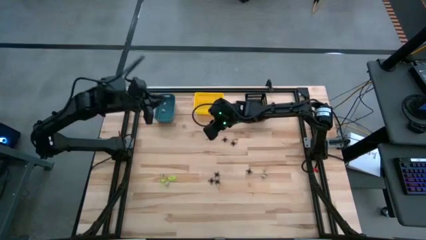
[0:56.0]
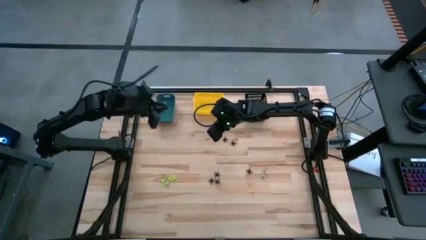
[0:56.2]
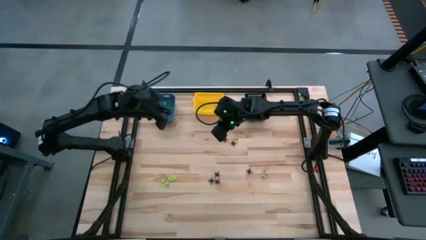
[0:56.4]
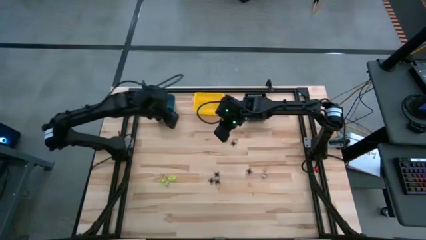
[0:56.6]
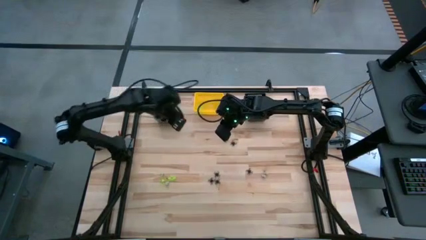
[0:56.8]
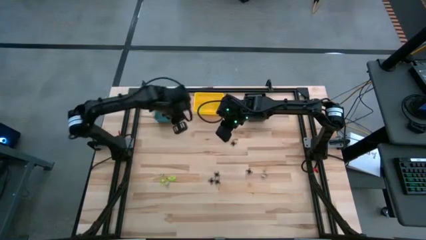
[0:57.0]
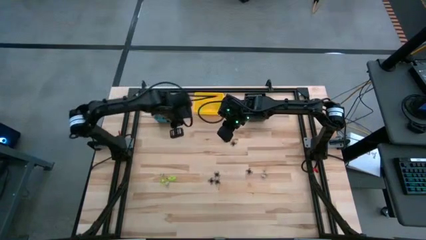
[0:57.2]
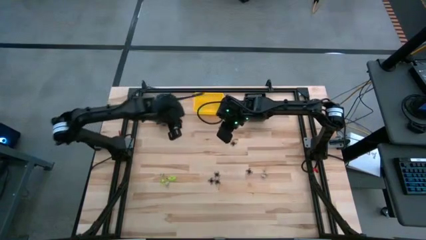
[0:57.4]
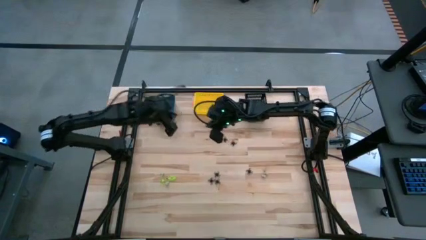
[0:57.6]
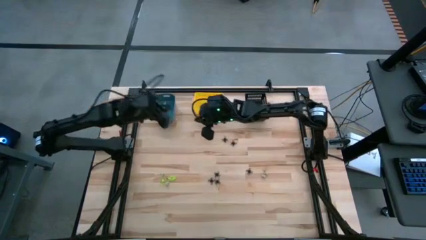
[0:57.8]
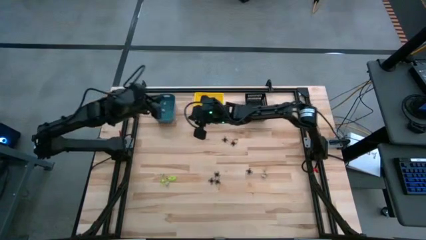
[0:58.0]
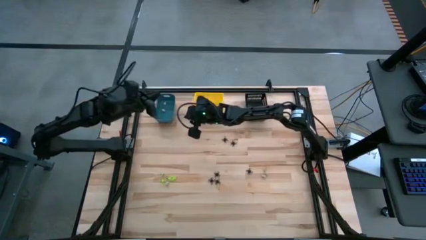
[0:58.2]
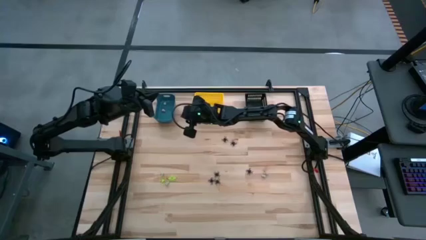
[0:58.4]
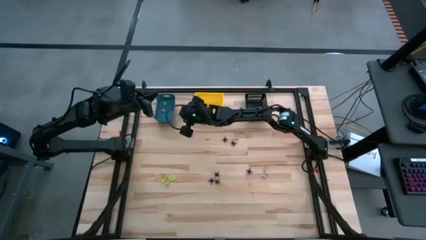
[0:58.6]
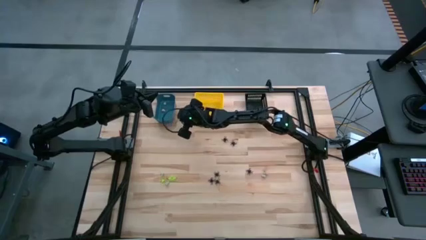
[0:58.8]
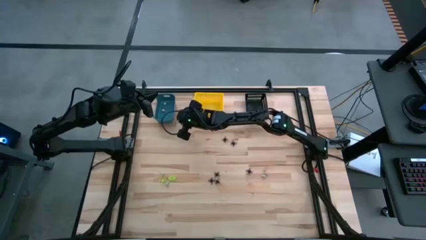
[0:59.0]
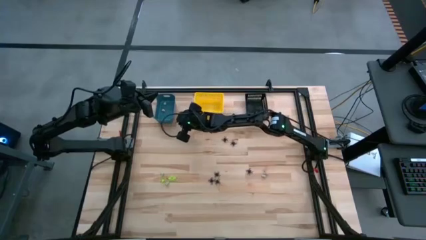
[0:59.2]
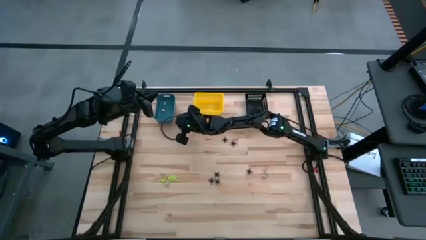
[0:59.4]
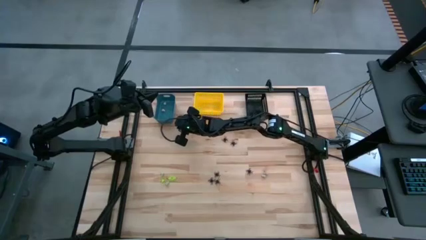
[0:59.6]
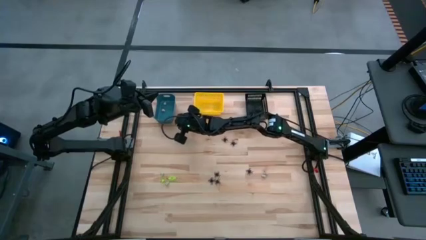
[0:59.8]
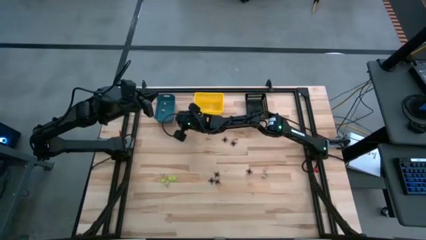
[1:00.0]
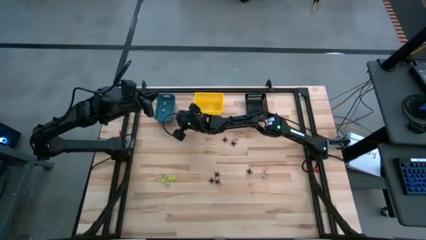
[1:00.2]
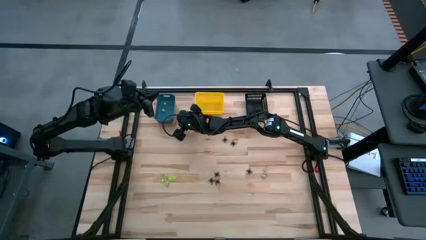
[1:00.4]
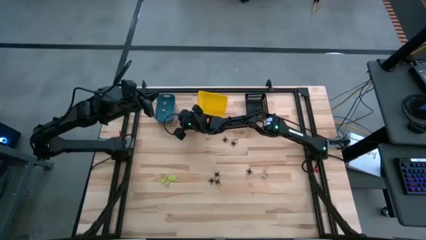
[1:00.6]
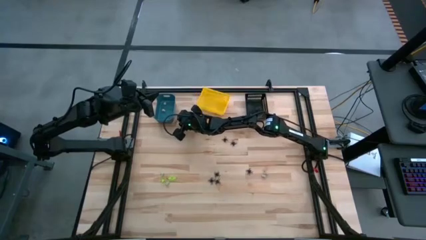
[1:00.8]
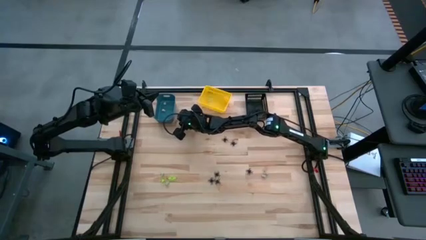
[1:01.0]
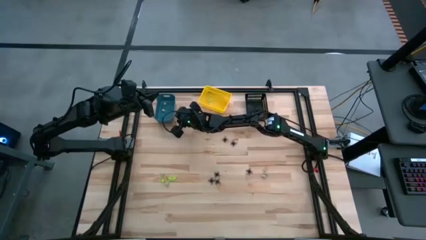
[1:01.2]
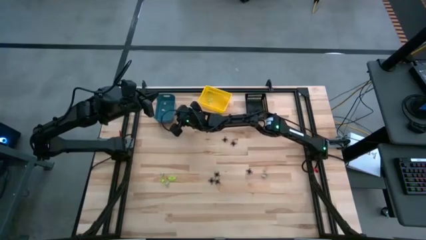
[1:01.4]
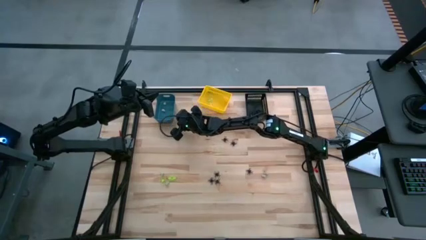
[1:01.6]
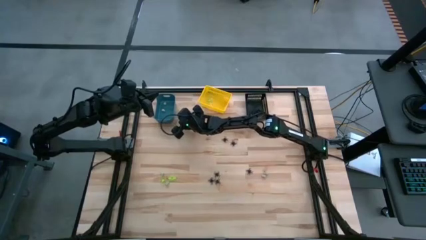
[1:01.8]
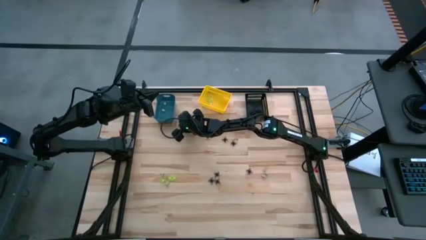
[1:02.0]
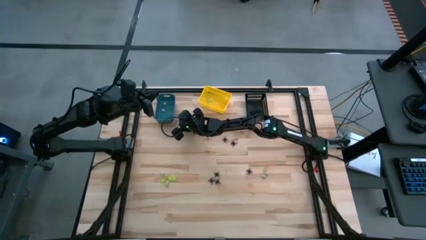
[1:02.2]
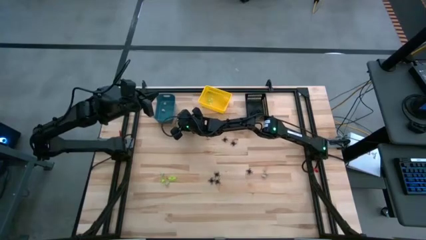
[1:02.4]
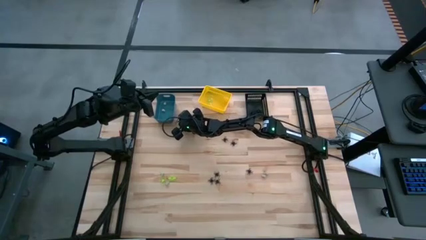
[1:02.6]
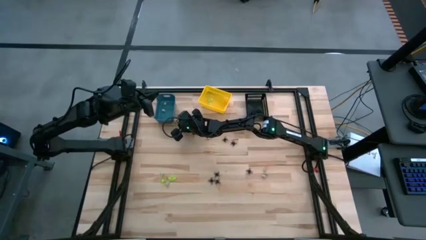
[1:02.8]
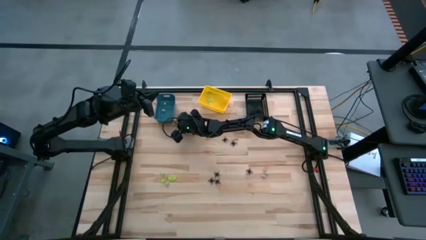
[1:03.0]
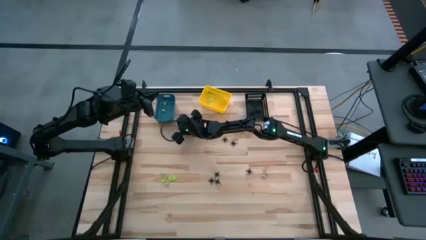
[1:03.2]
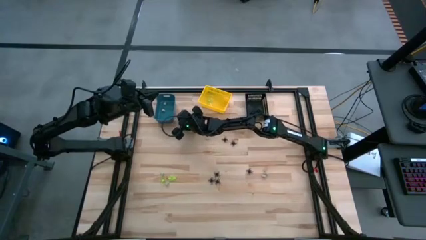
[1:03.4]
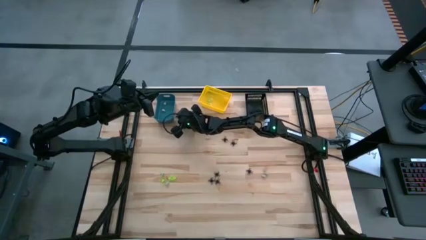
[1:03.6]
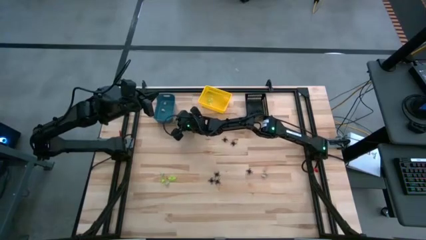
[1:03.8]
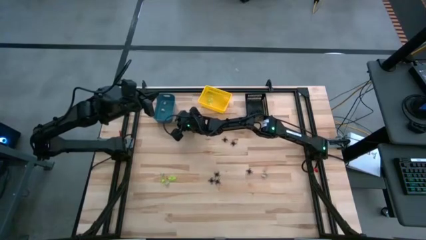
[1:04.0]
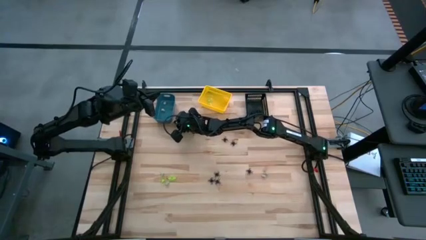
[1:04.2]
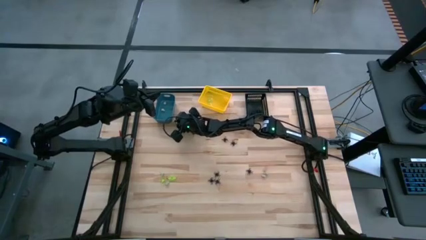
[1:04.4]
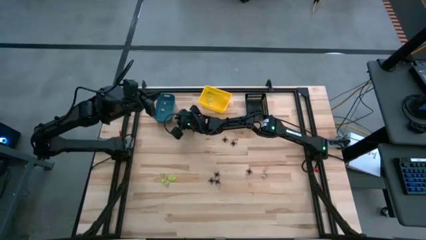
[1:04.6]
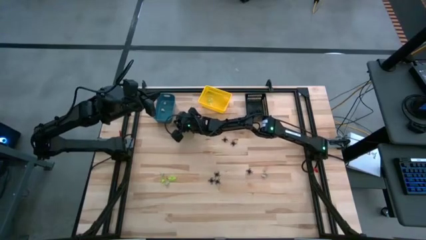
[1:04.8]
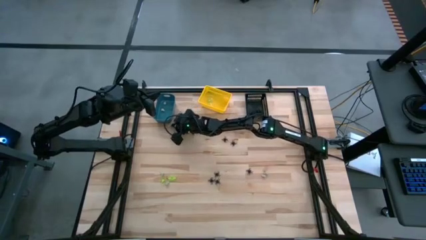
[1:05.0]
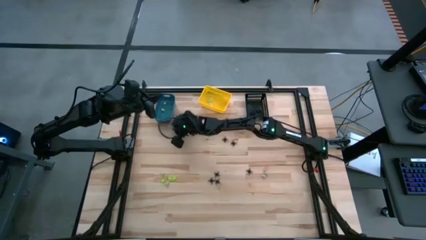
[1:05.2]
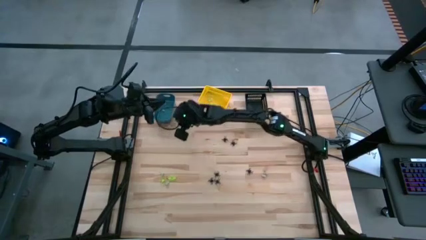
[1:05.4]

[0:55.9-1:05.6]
Task: Sort Halloween decoration
Put the gray skull toy into the blue bin

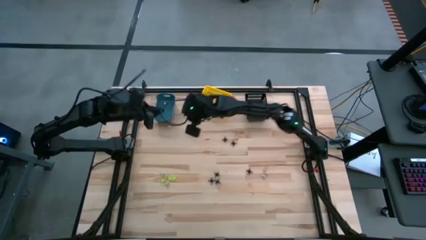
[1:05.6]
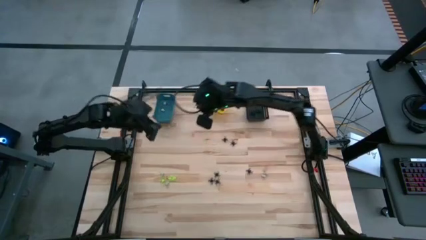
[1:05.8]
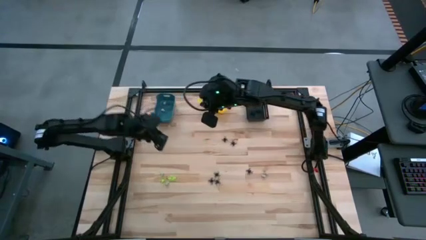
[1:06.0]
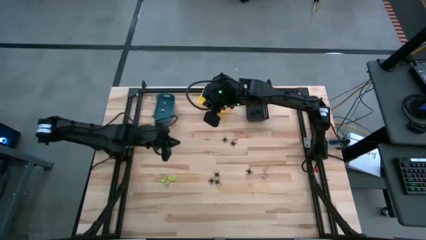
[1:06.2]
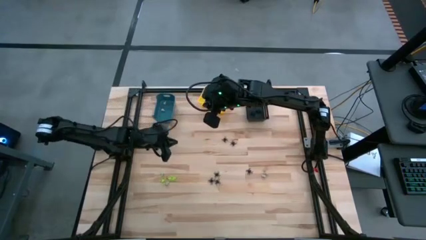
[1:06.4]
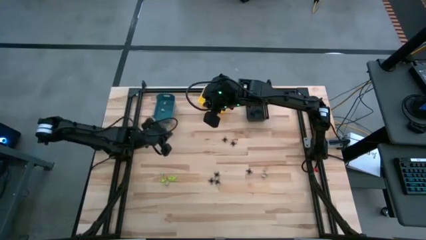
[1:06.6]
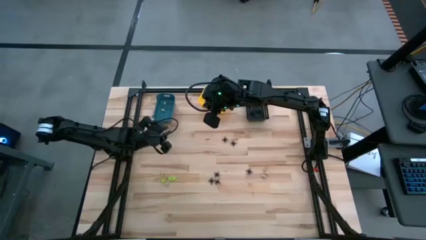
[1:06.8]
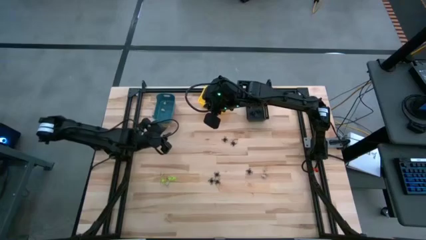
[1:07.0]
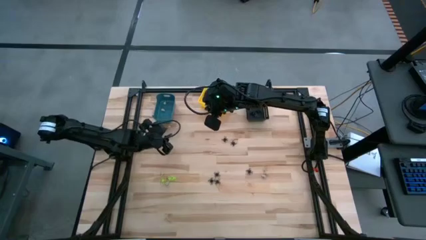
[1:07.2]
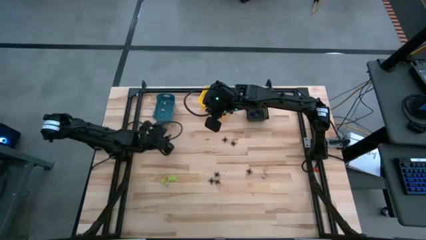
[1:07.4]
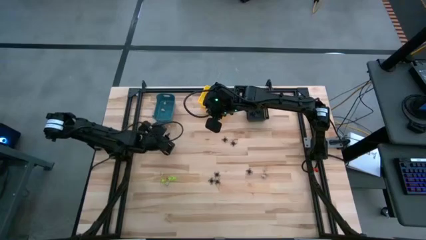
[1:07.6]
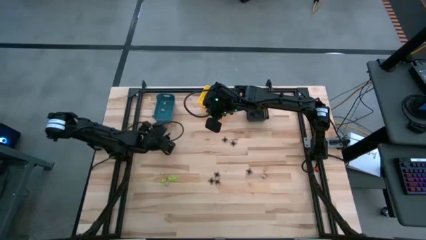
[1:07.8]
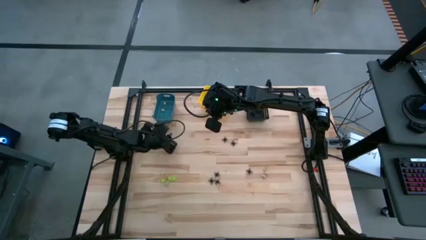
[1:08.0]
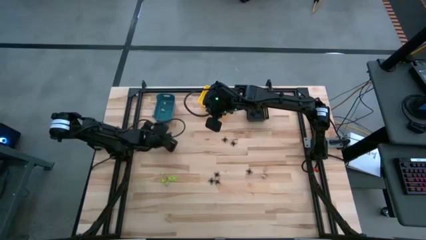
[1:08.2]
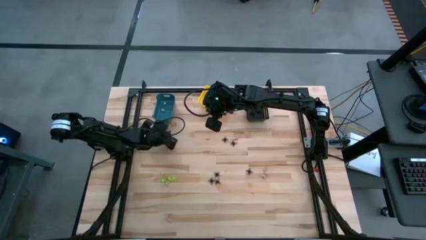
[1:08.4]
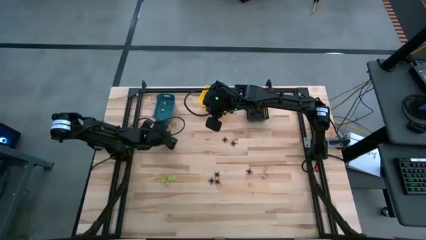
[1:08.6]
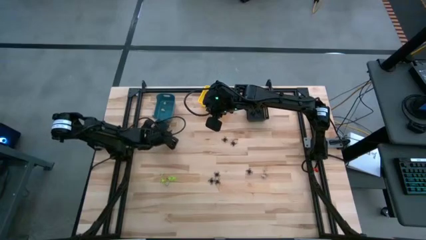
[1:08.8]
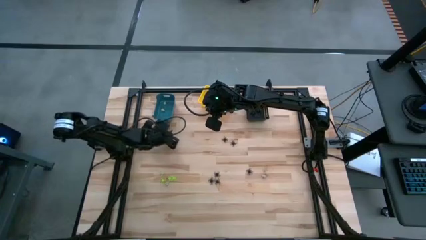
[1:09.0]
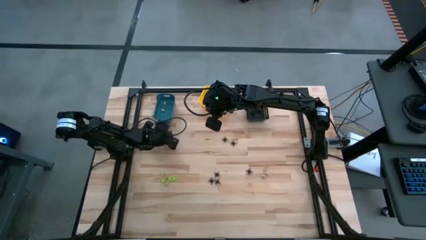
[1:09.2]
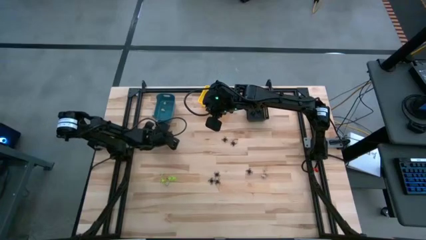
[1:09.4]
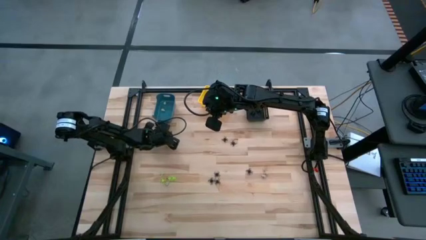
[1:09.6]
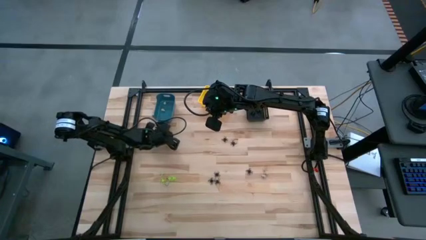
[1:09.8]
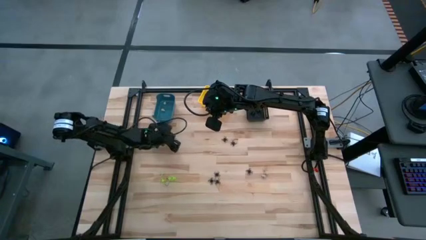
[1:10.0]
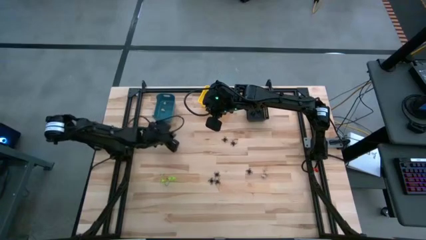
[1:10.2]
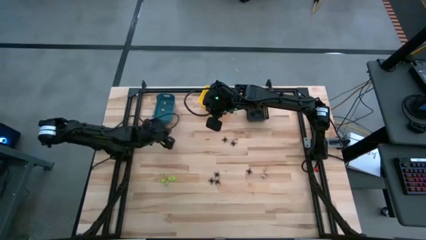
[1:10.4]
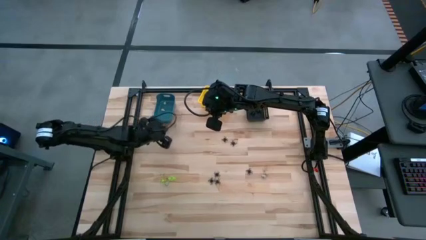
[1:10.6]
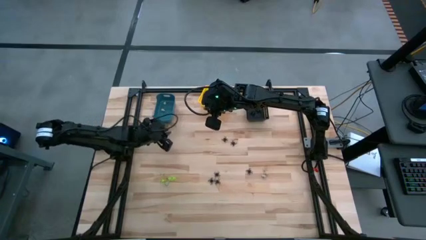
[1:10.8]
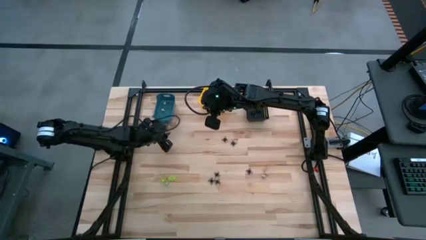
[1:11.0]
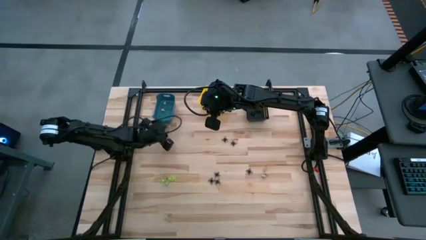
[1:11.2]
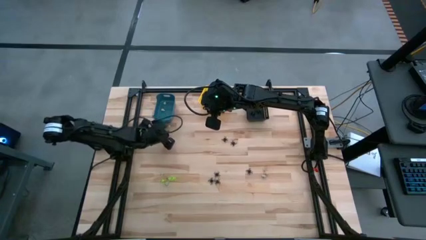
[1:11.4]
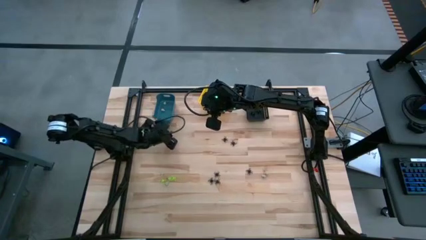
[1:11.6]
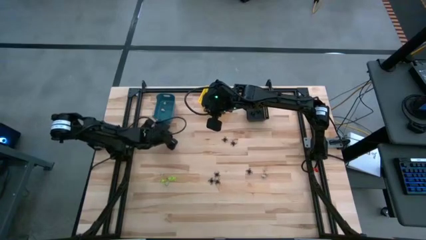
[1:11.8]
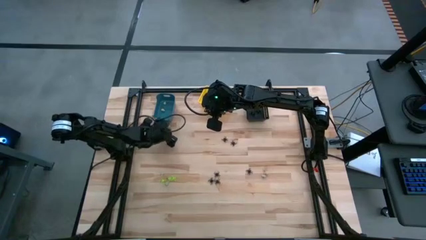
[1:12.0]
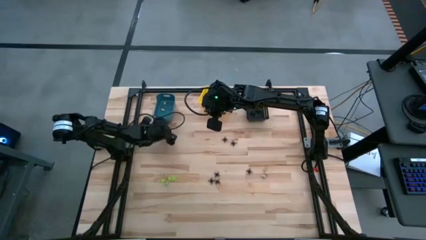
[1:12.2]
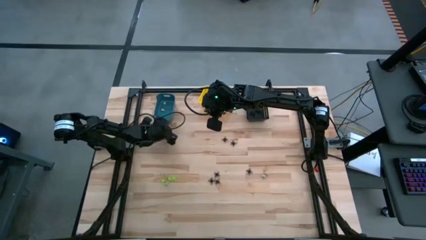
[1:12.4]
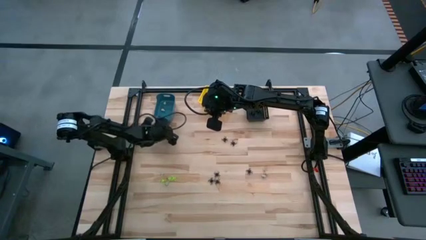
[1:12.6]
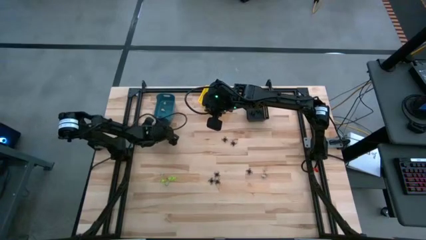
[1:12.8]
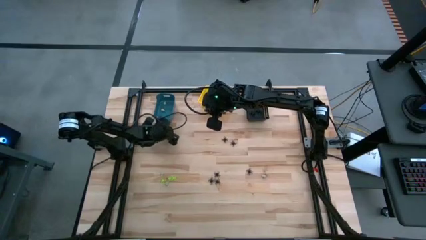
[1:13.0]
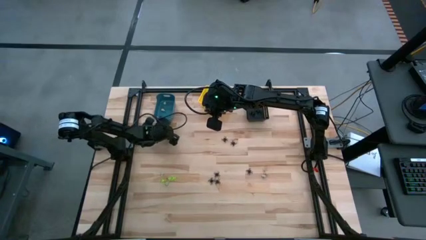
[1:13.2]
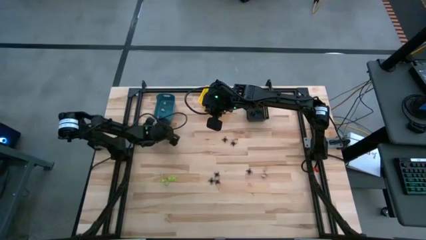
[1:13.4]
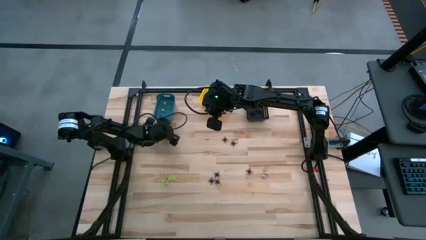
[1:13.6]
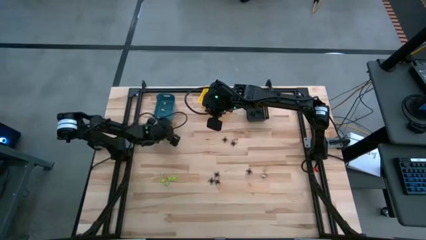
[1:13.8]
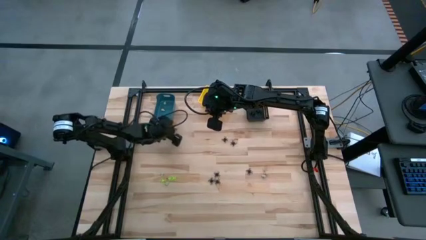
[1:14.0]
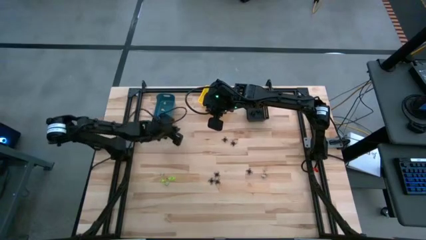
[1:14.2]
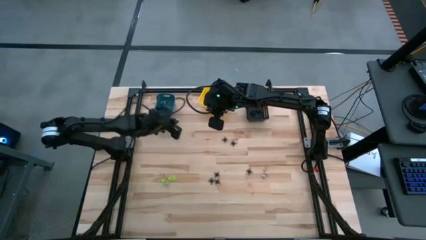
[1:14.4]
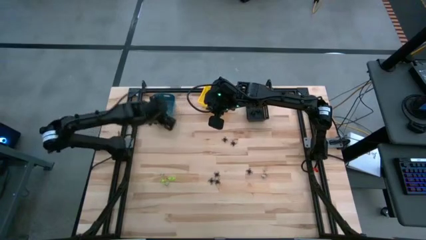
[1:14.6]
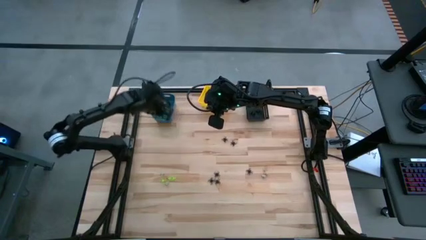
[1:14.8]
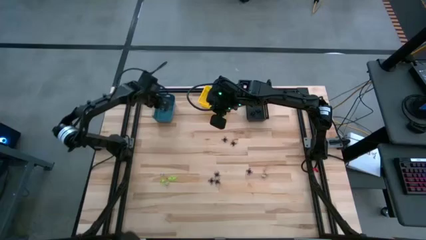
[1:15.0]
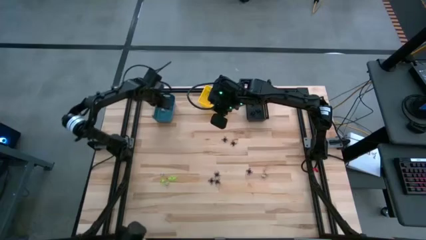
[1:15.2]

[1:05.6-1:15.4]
Put the gray skull toy into the blue bin
